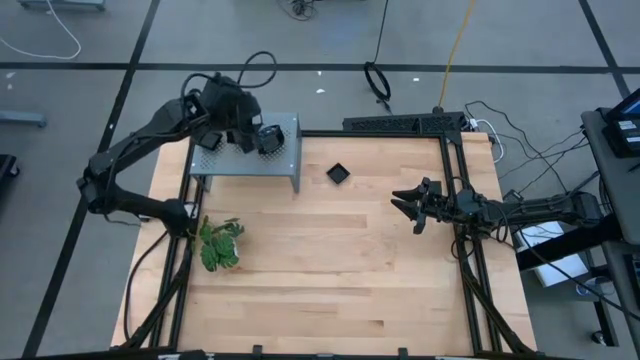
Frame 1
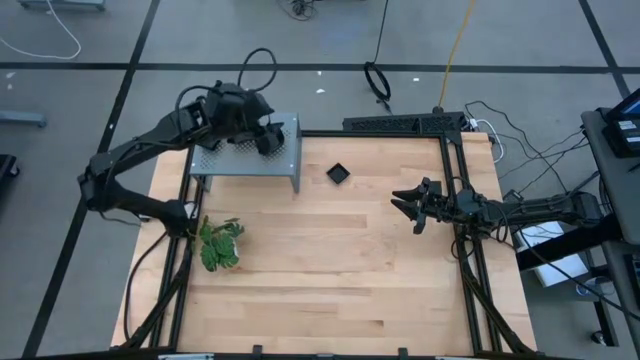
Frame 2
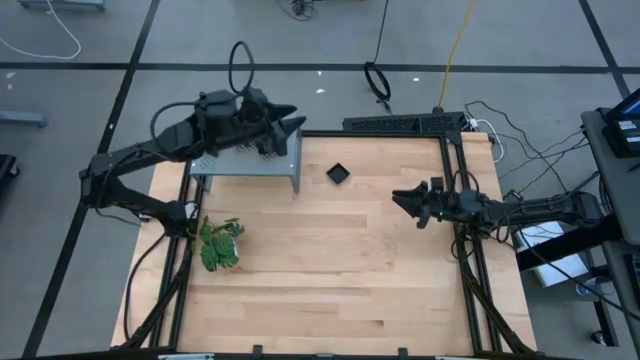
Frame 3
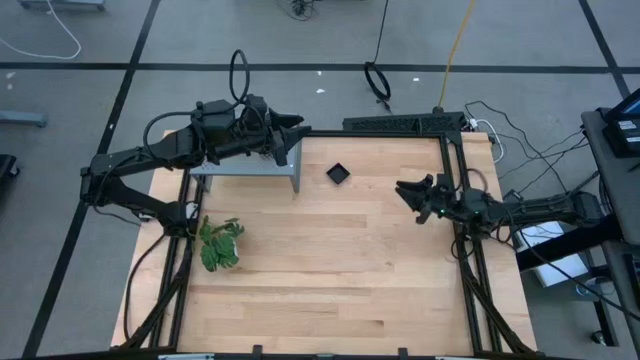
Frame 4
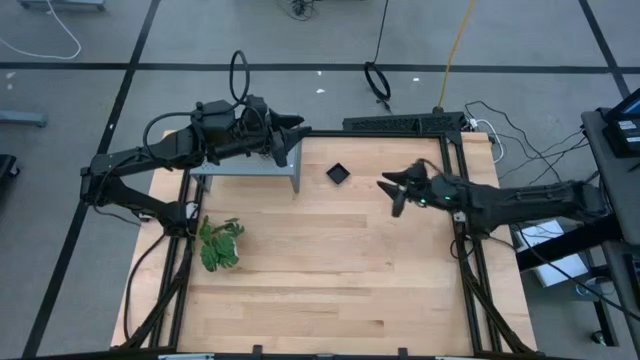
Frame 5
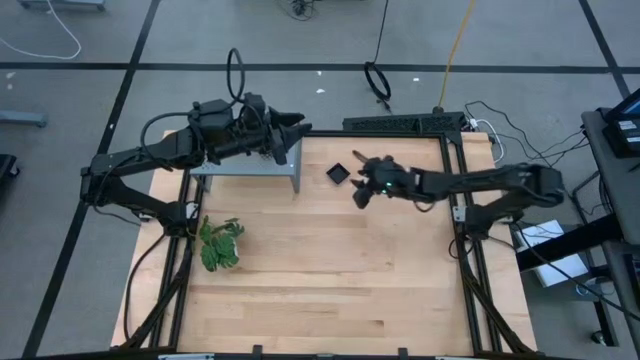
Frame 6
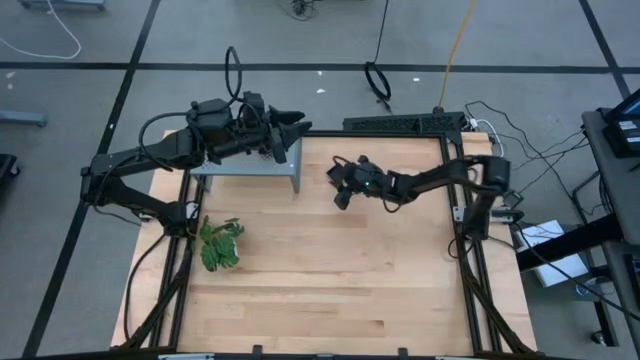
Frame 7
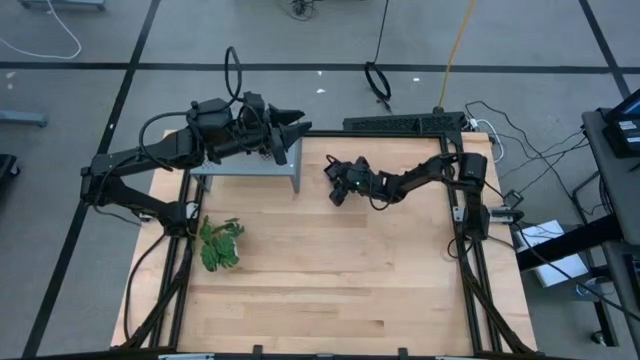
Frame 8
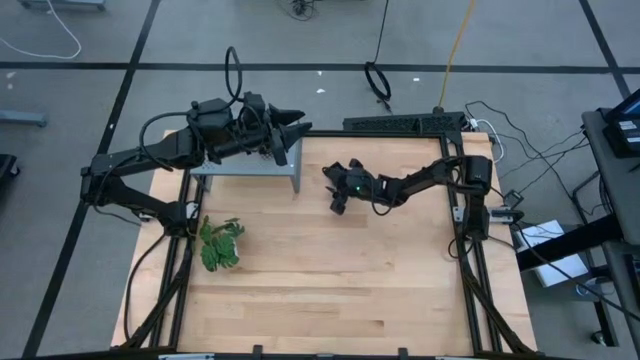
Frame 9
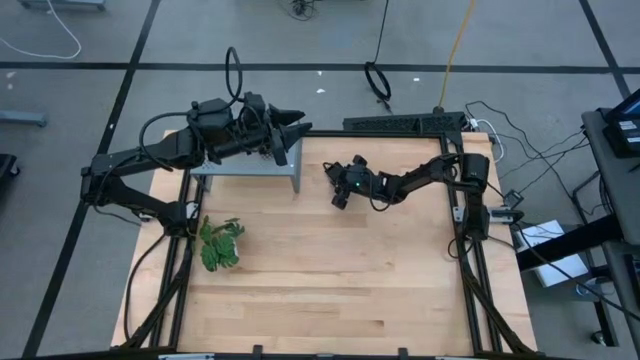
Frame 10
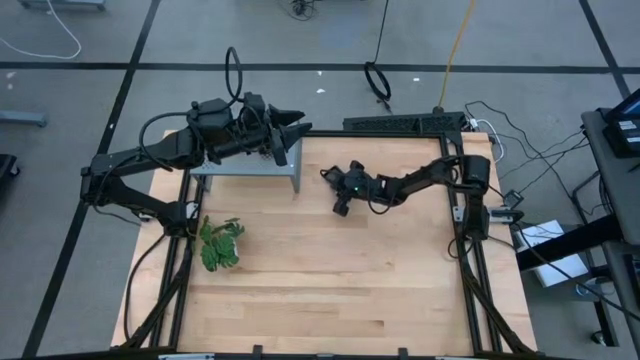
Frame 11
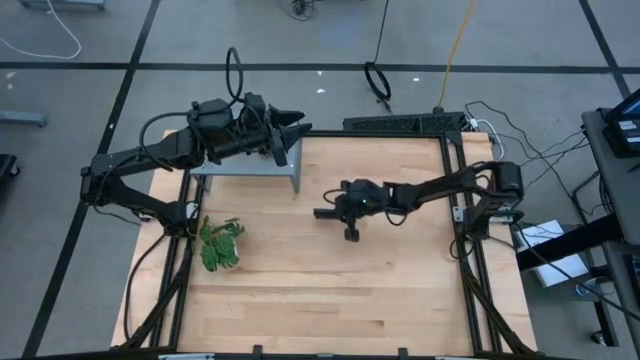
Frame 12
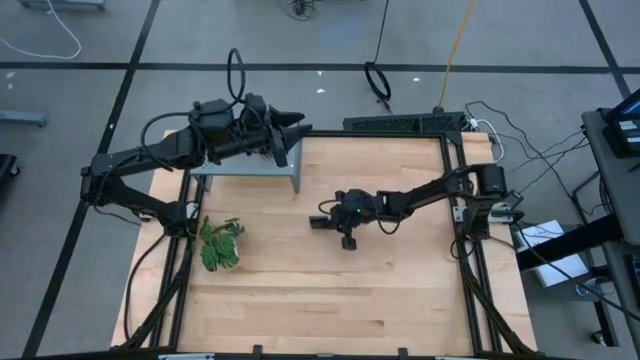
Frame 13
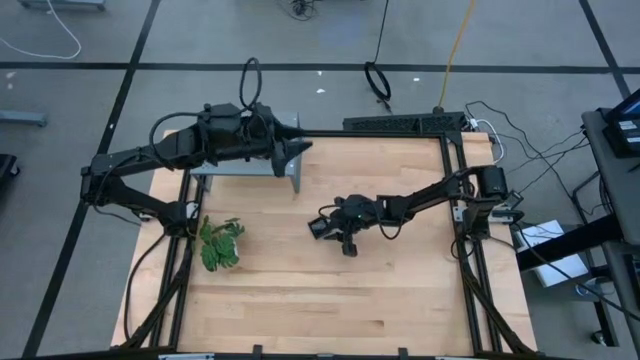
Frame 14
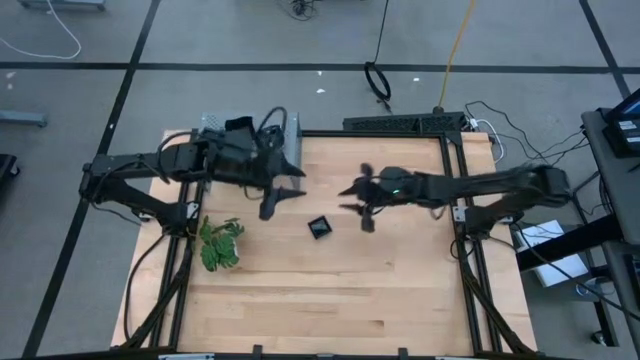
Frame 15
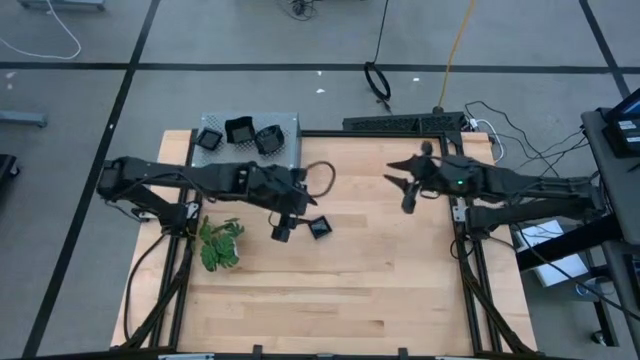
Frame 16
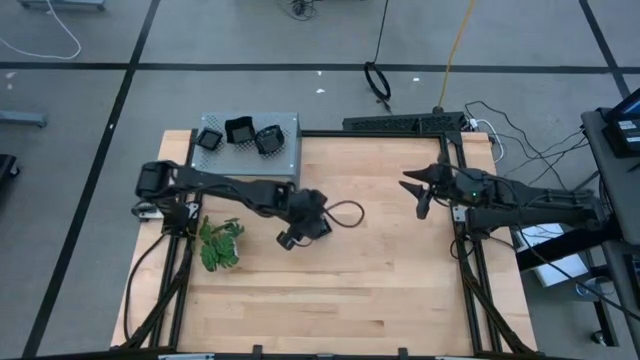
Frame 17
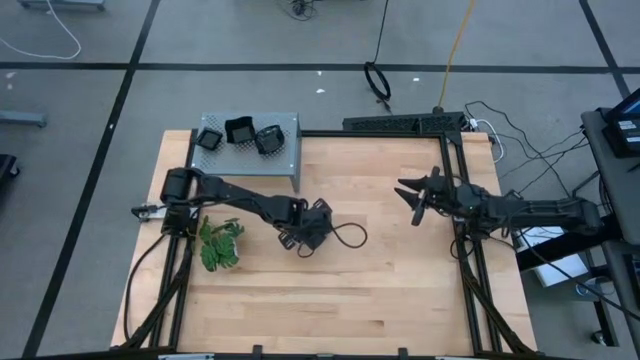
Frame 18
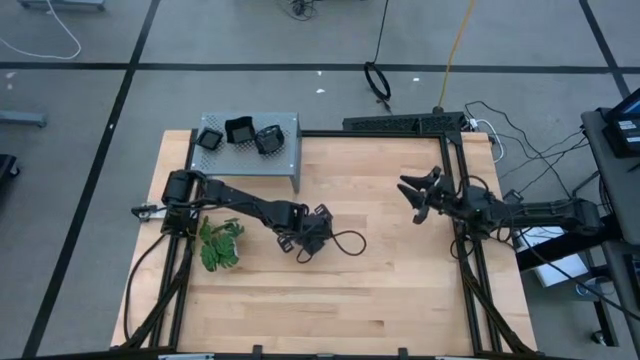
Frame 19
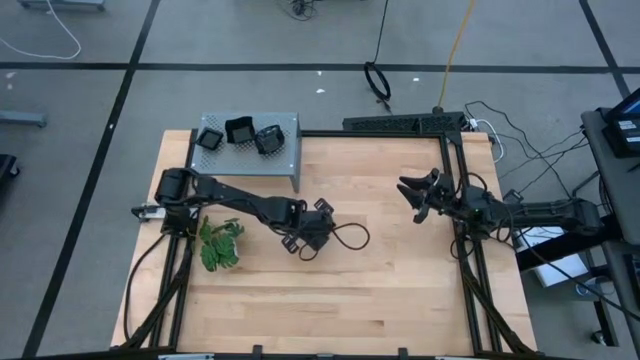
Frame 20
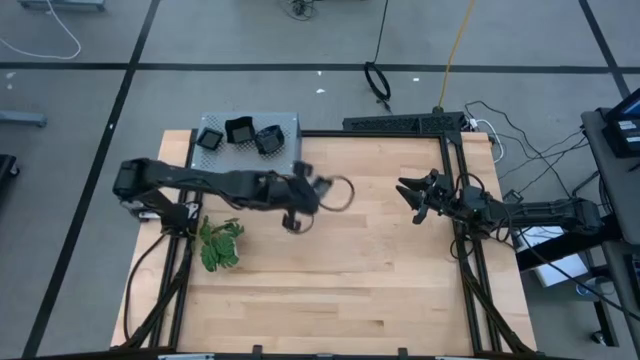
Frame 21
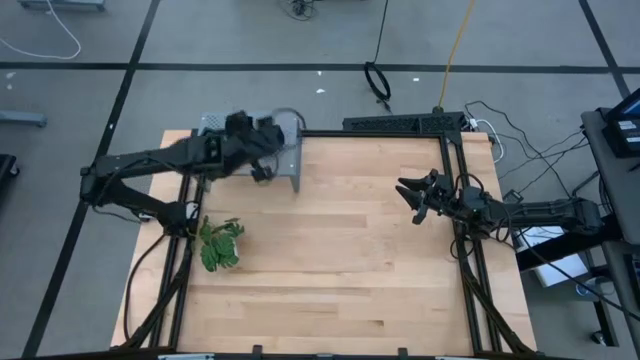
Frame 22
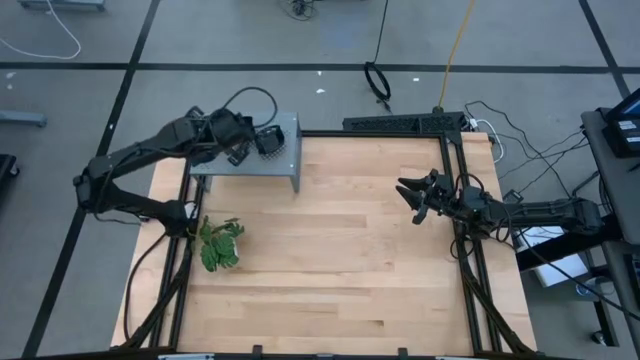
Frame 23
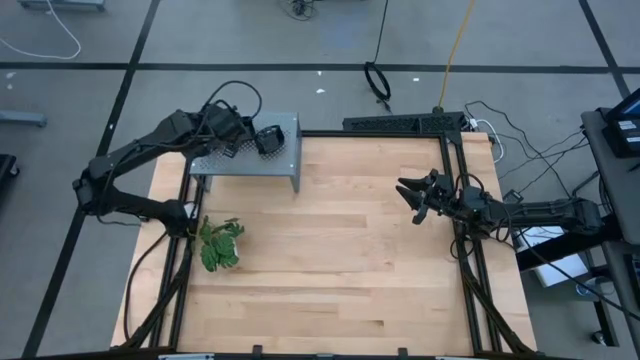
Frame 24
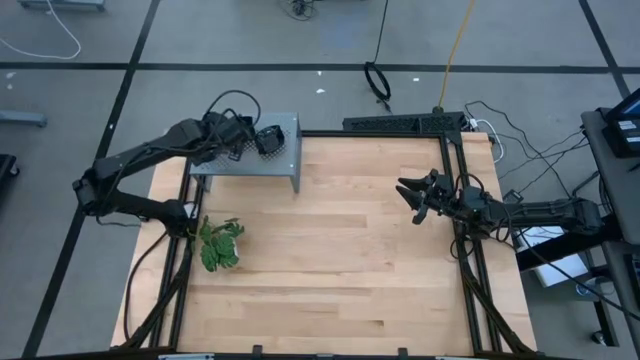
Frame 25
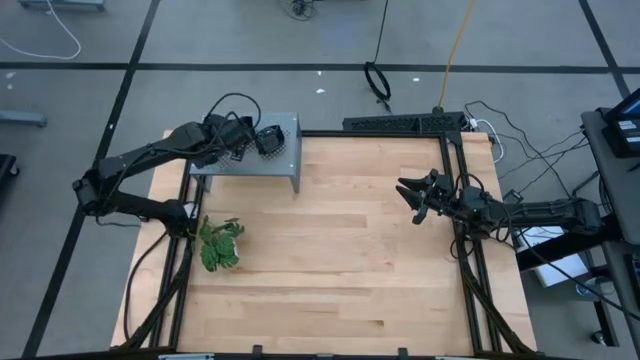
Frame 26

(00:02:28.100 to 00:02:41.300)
Task: Pick & Place Mini shaped plates
Stack the square plate on top of the square plate on the shelf

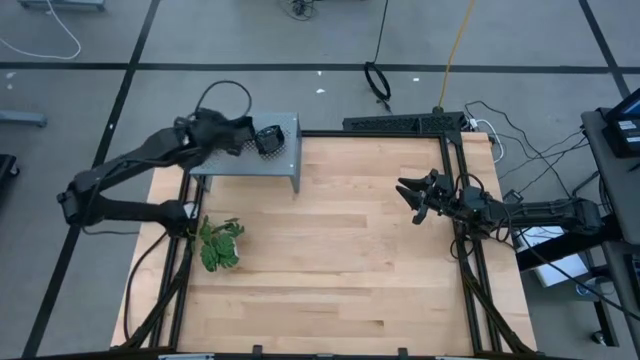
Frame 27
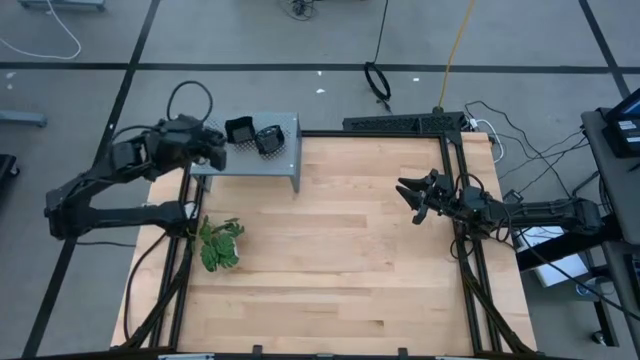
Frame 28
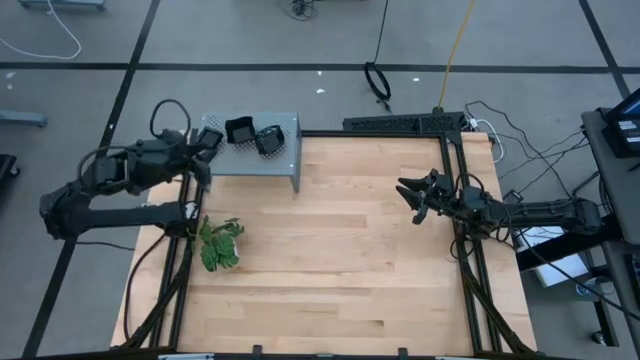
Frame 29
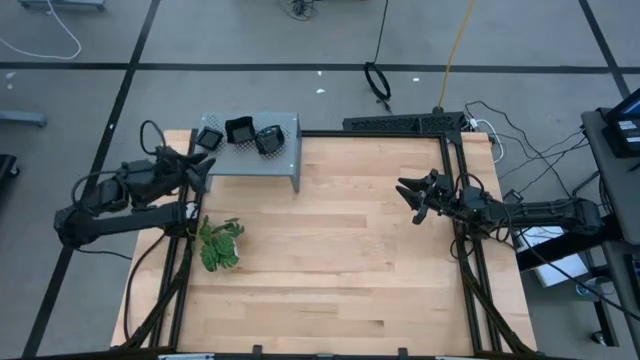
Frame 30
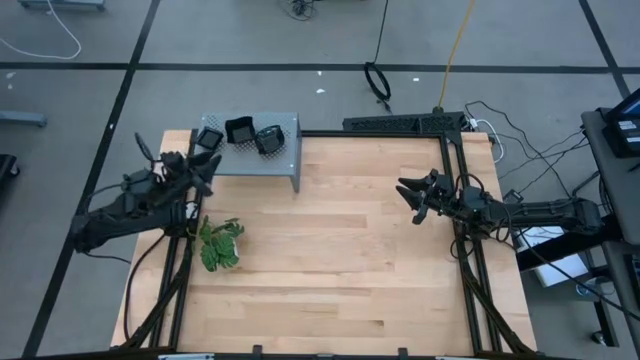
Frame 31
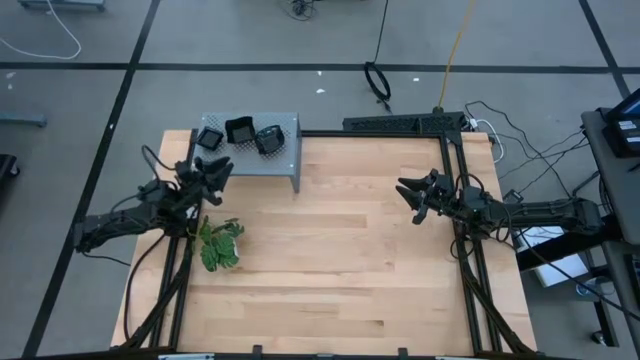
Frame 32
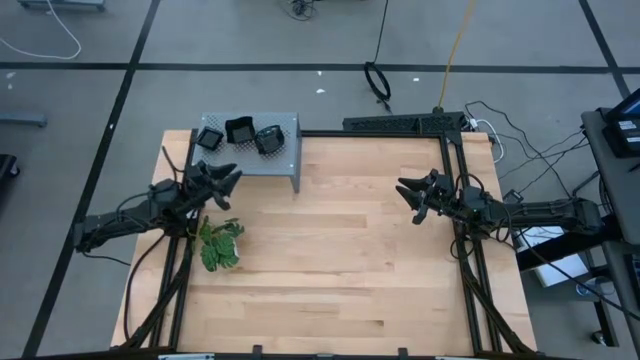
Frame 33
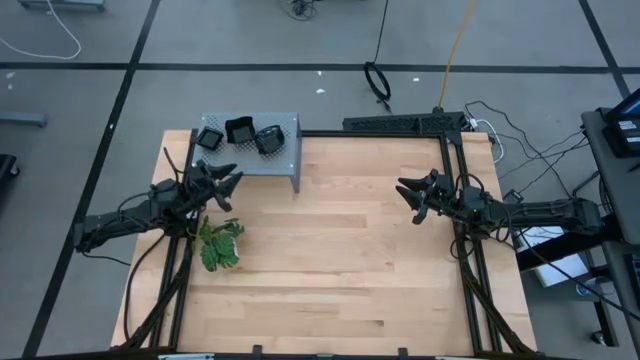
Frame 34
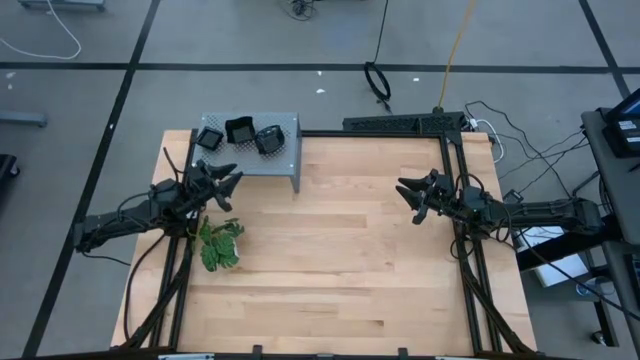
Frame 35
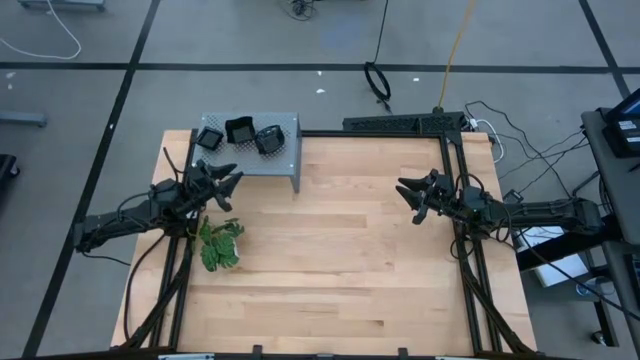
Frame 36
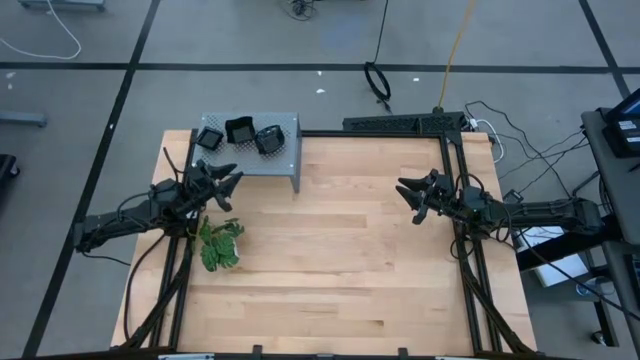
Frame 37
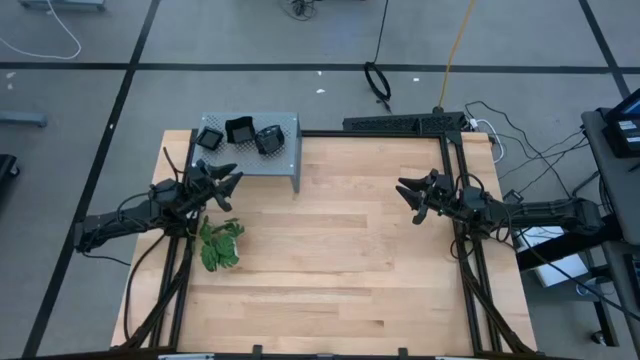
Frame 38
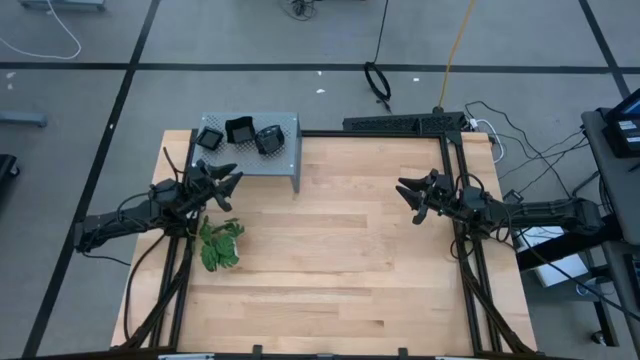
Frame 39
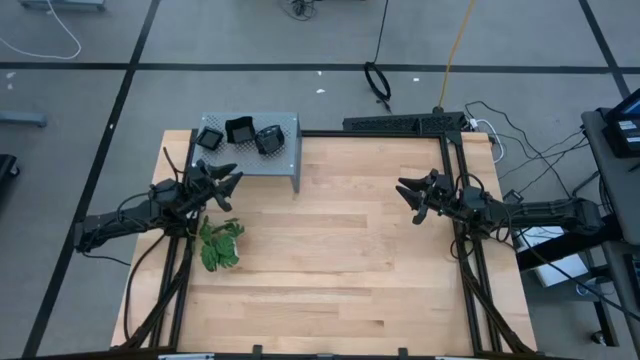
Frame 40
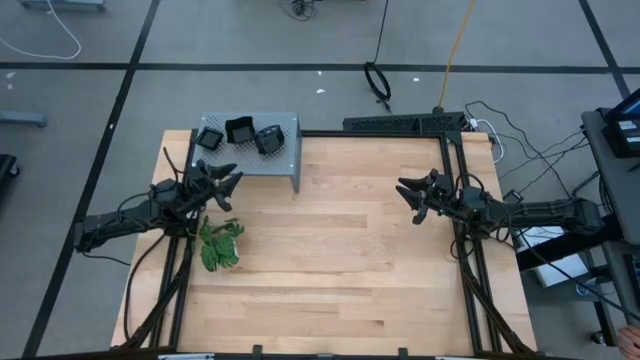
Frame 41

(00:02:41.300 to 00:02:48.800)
Return to Home Position

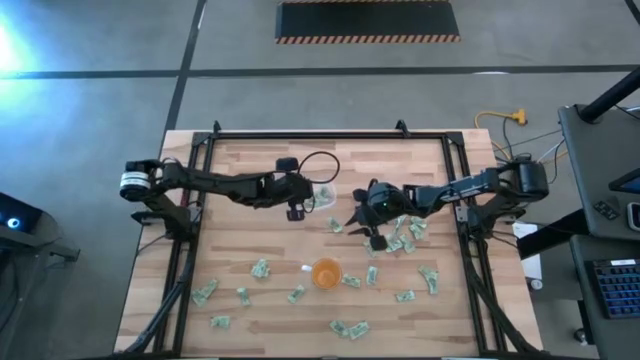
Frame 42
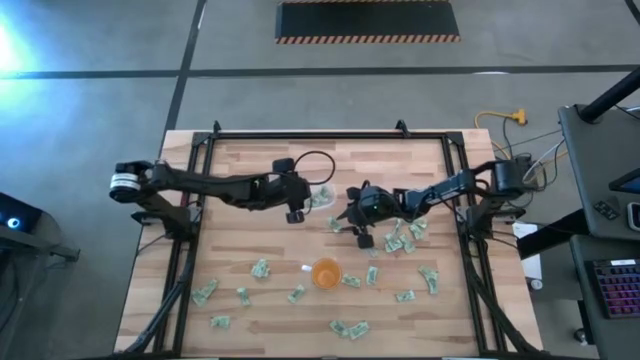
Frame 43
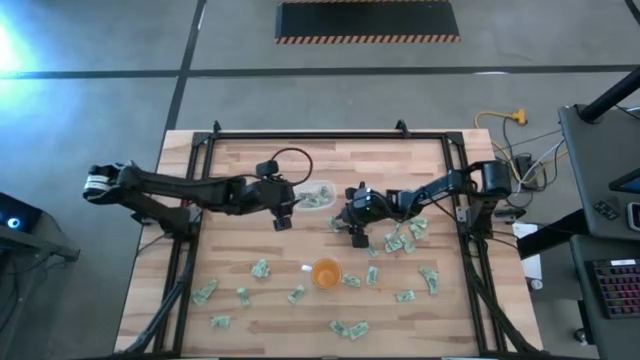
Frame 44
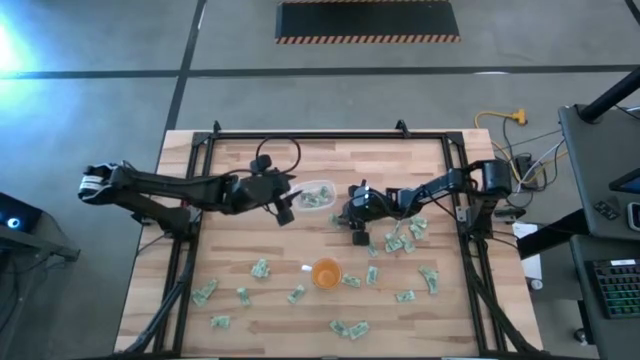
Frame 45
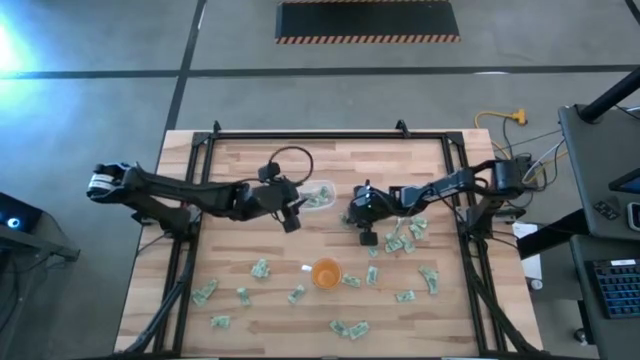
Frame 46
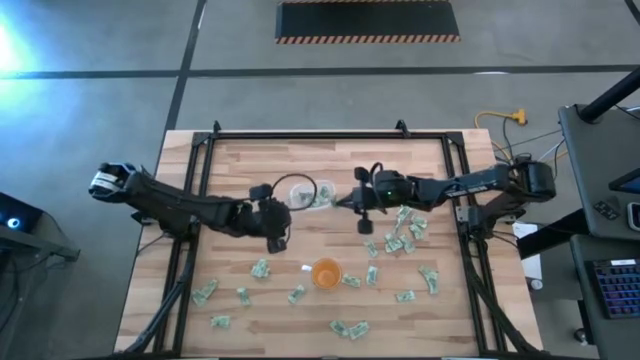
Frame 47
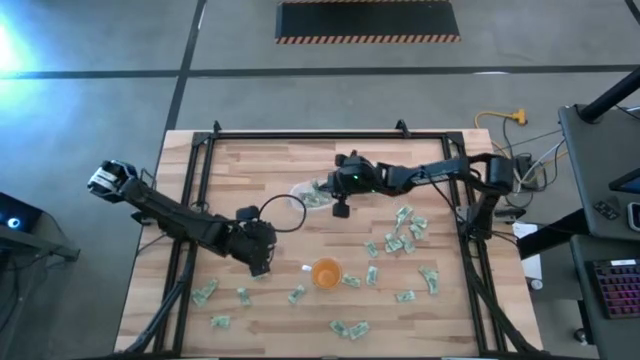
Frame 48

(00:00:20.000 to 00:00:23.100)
Task: Pick and place Stevia / Truvia into bins
Put the stevia packet into the transparent bin
